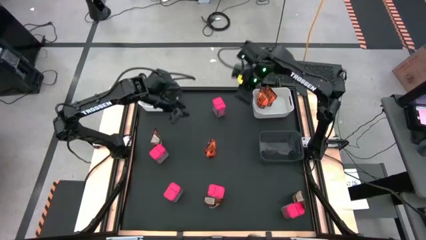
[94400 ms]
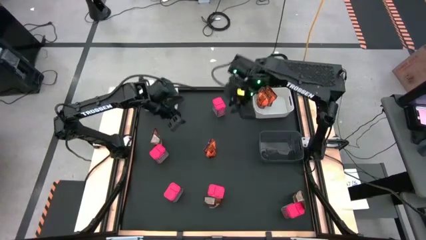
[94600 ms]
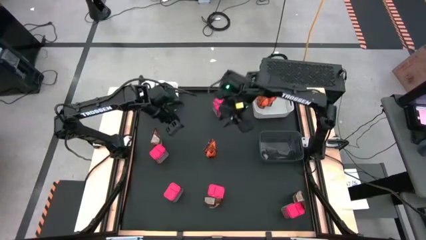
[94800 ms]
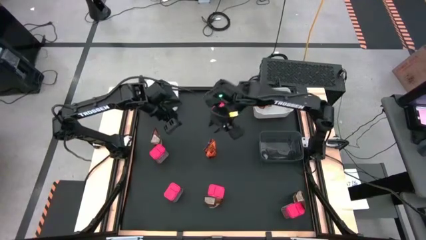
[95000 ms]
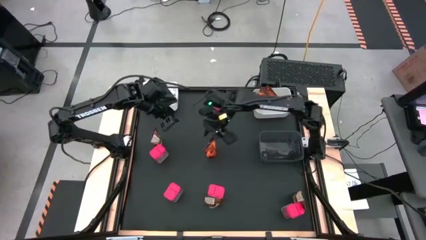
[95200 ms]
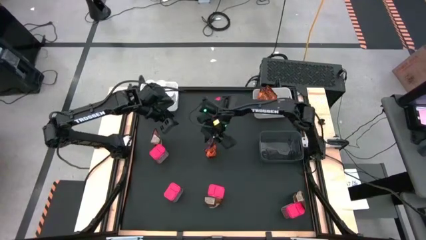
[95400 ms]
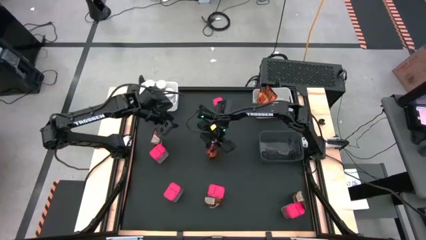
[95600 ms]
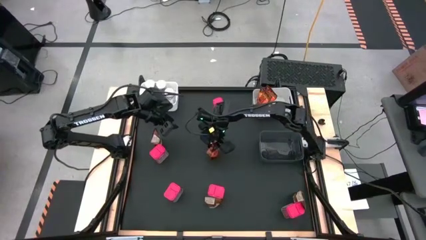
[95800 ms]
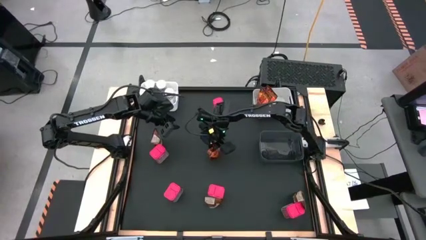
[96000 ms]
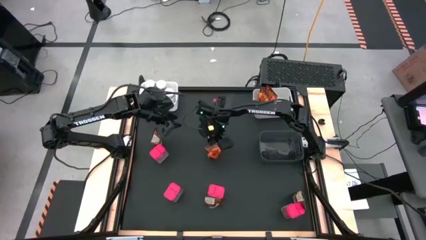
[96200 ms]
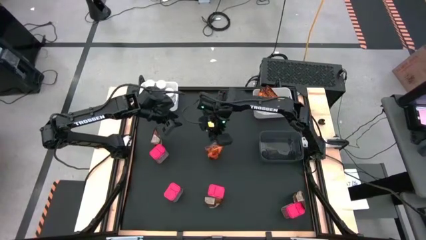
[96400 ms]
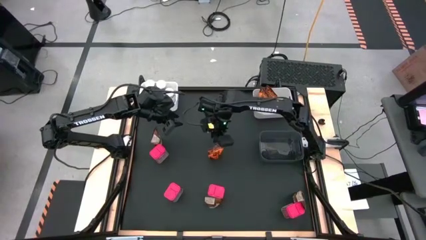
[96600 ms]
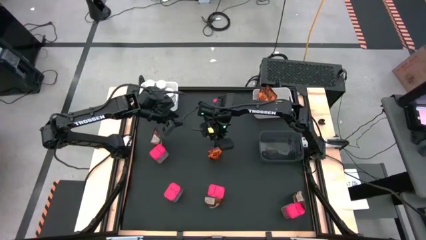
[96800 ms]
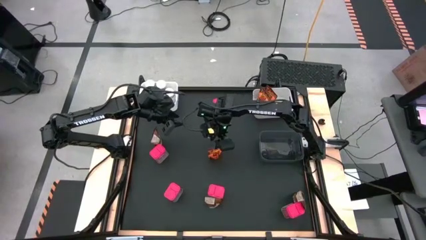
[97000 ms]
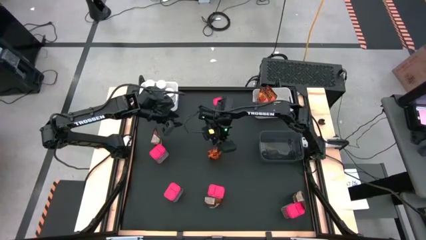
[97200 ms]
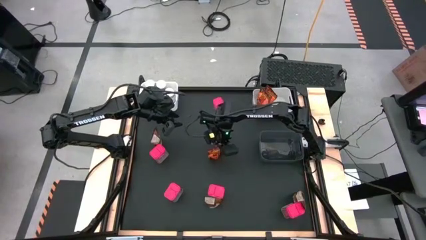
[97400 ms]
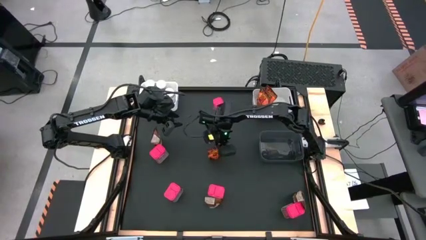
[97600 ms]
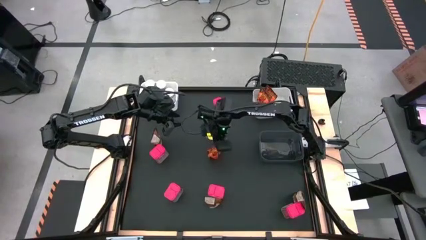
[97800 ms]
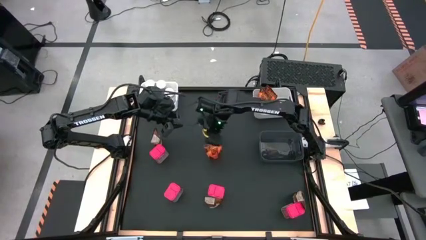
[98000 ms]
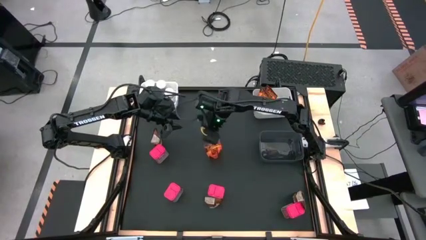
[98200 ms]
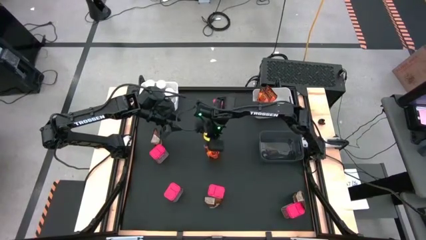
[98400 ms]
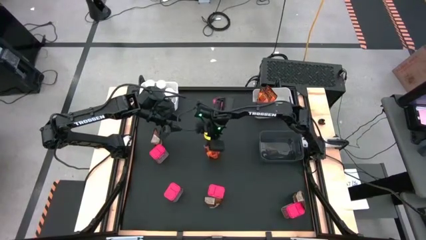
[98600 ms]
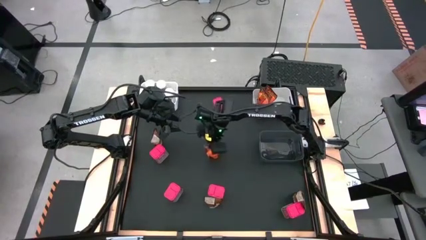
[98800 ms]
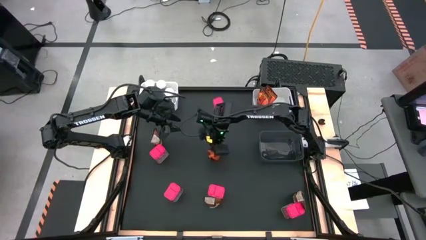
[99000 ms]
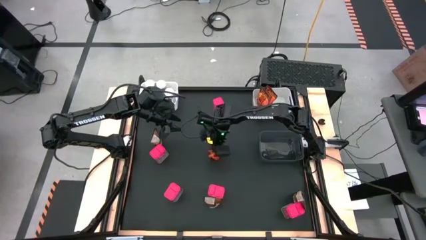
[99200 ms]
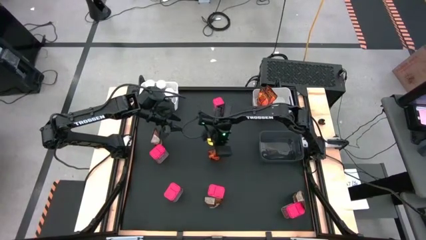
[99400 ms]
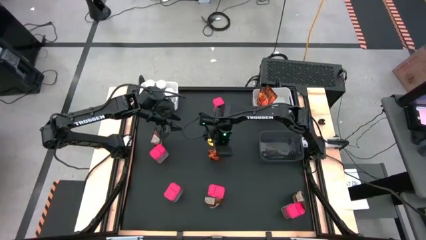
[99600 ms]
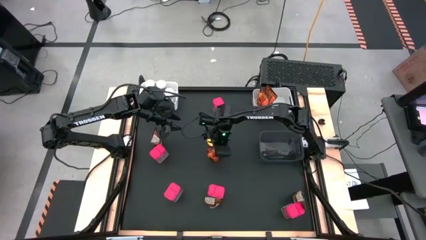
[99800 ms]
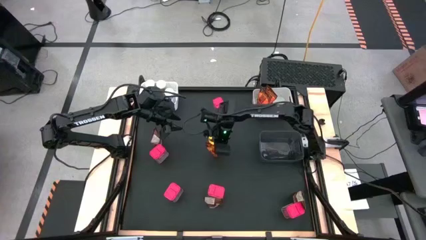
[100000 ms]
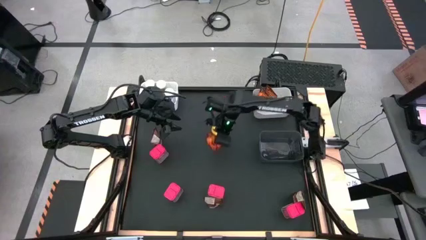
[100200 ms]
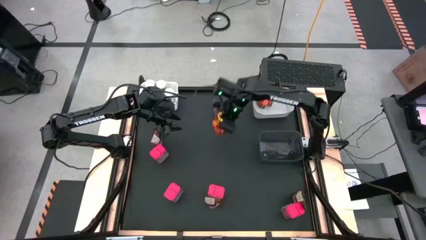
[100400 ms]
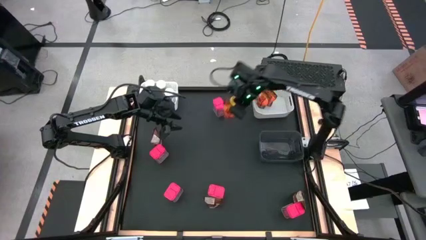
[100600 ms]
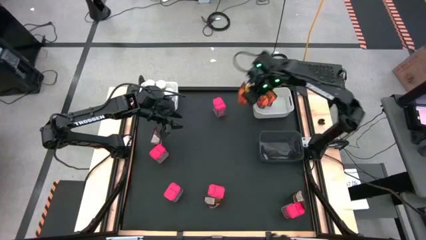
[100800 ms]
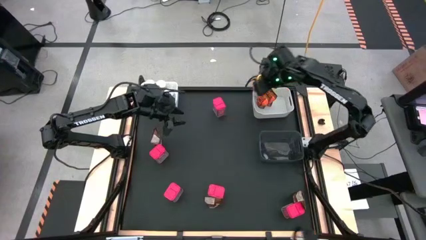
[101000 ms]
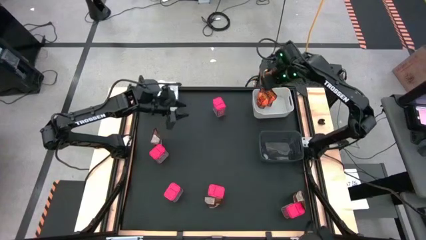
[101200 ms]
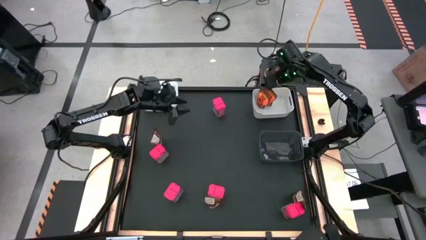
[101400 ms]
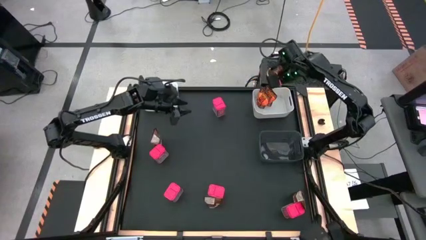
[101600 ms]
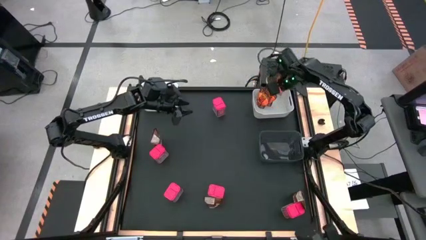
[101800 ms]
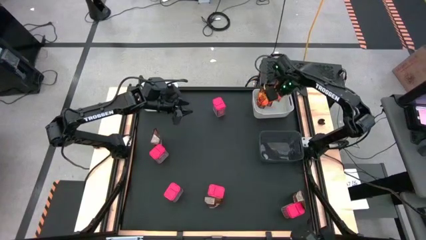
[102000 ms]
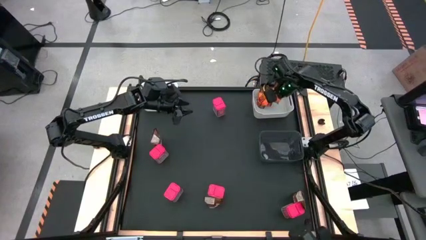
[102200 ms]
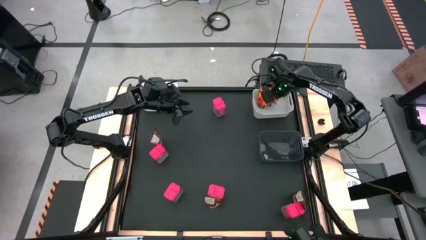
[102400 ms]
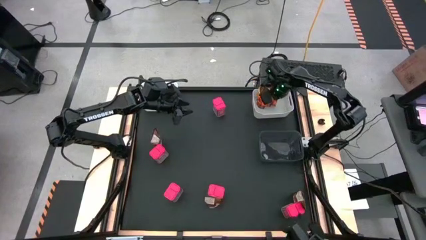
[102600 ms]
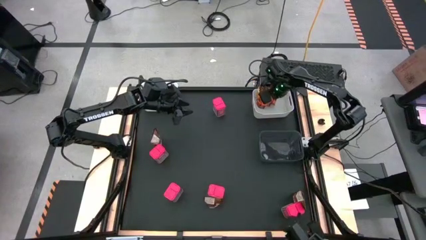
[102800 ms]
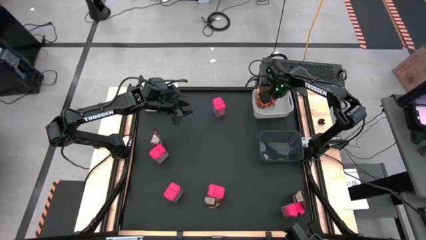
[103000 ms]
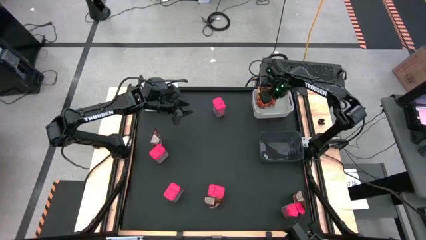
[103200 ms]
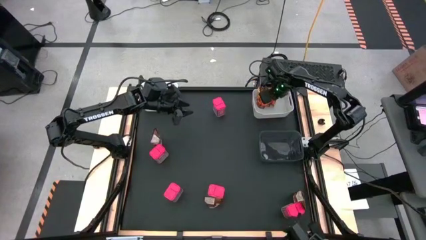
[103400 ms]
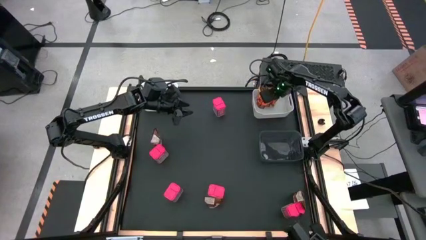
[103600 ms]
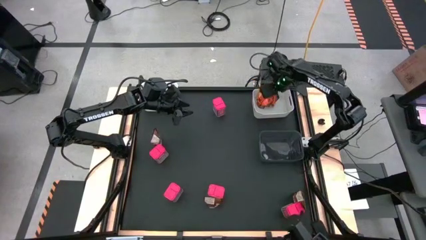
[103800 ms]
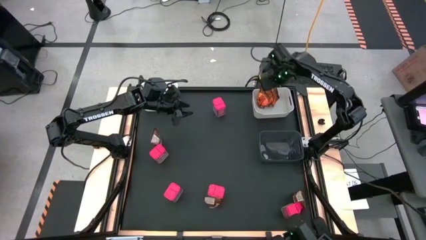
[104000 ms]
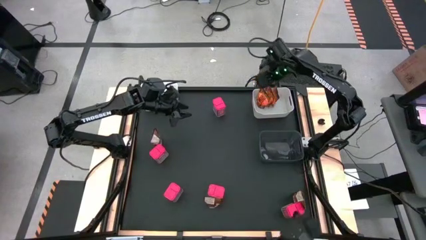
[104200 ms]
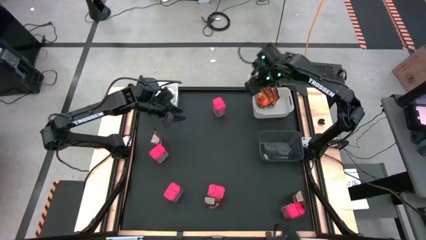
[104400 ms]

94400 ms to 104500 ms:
Task: Sort spices by type
Put the orange seasoning bag into the right white bin

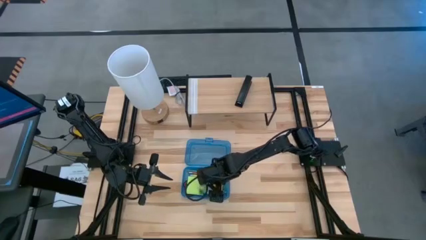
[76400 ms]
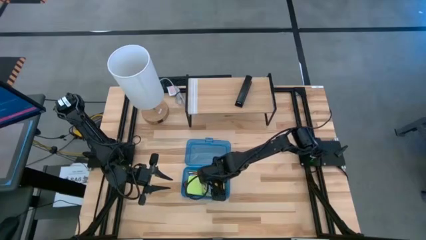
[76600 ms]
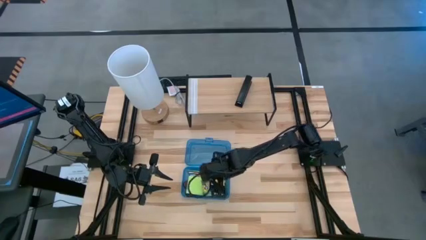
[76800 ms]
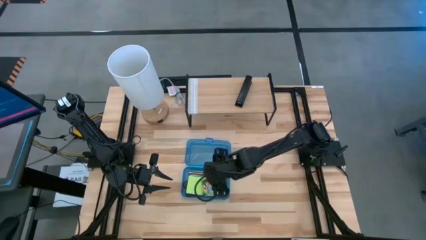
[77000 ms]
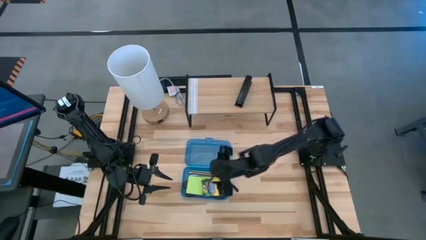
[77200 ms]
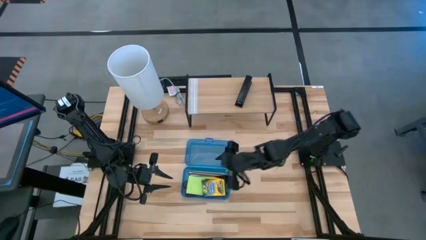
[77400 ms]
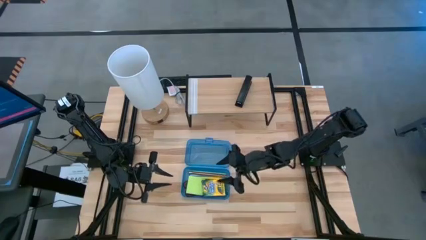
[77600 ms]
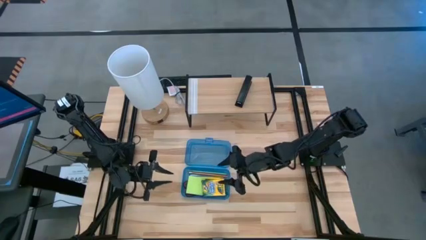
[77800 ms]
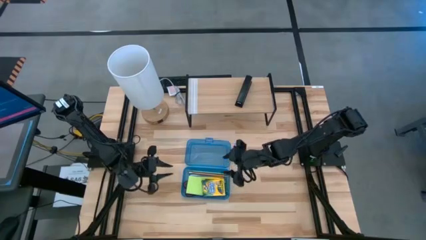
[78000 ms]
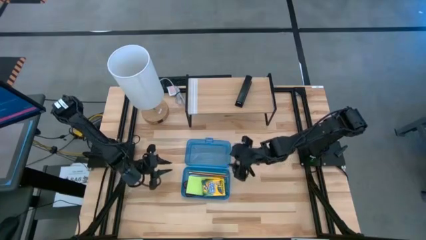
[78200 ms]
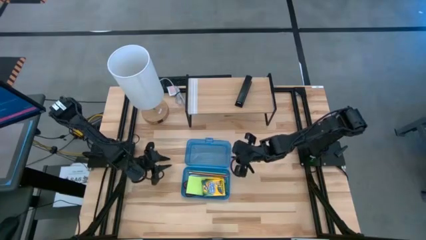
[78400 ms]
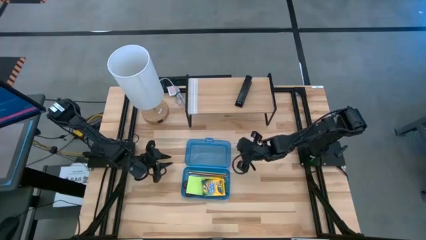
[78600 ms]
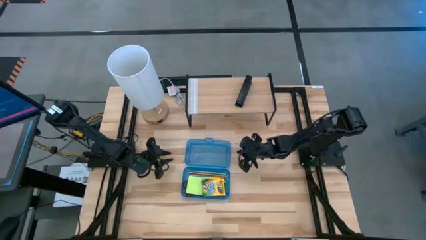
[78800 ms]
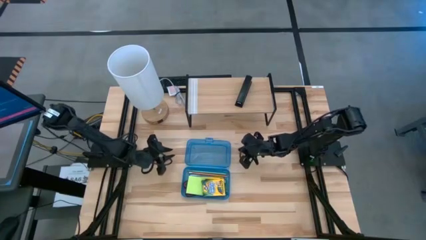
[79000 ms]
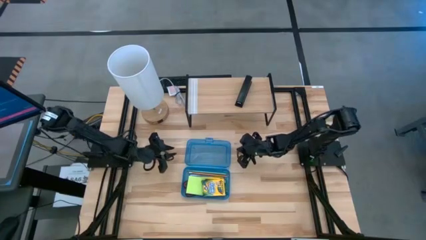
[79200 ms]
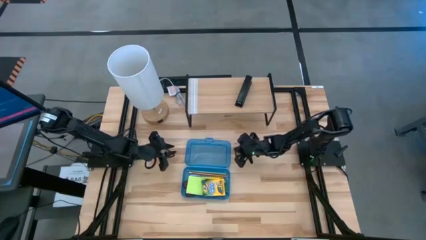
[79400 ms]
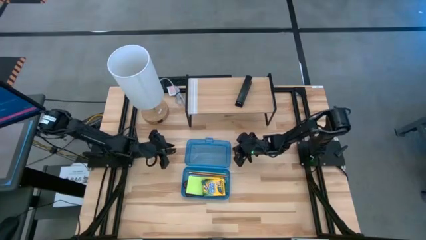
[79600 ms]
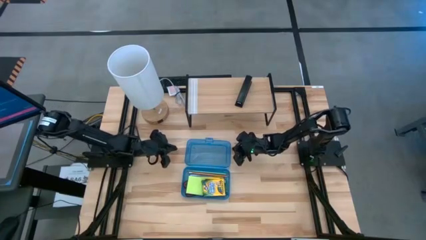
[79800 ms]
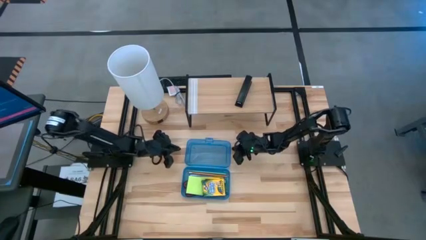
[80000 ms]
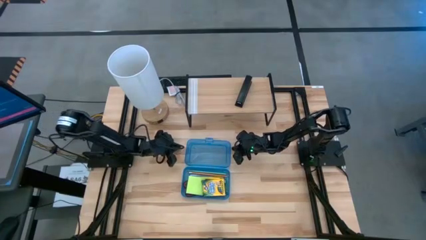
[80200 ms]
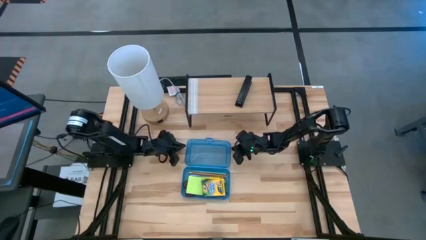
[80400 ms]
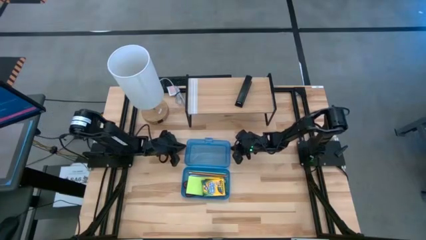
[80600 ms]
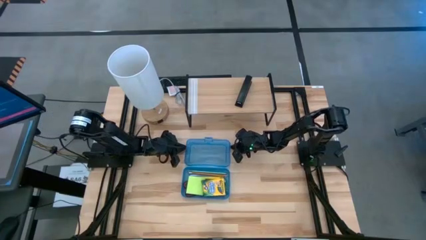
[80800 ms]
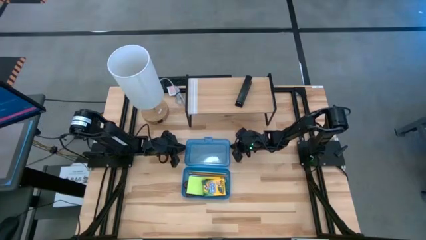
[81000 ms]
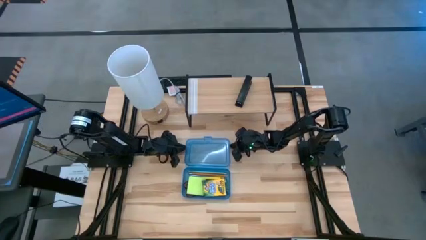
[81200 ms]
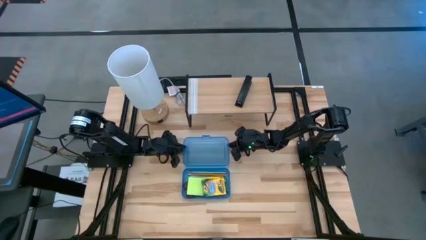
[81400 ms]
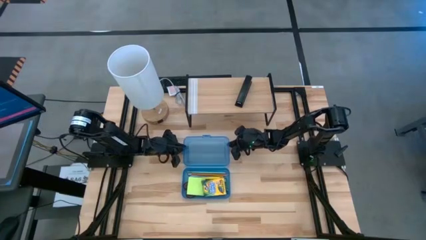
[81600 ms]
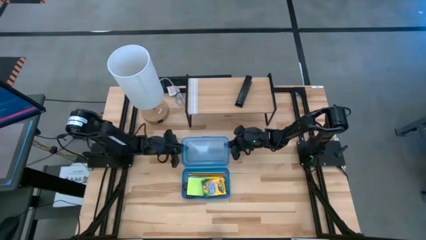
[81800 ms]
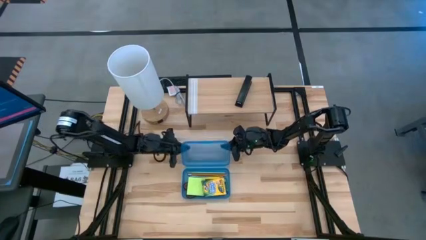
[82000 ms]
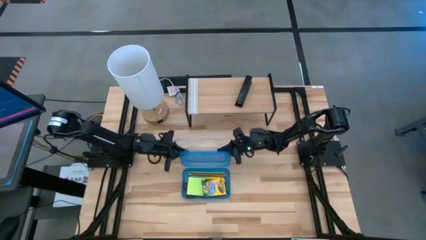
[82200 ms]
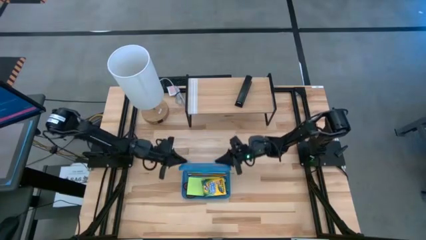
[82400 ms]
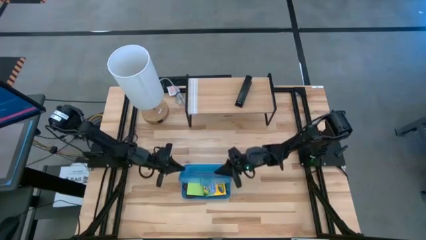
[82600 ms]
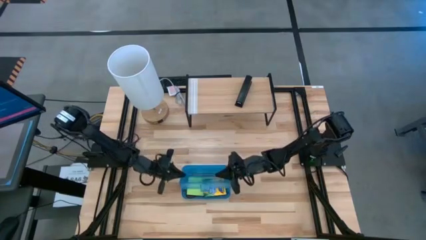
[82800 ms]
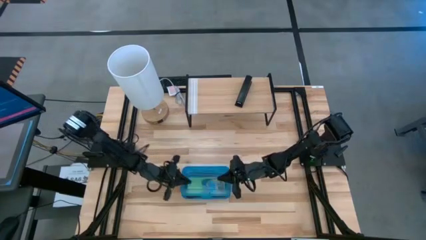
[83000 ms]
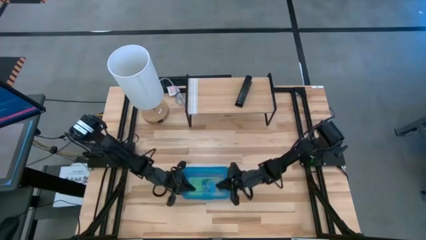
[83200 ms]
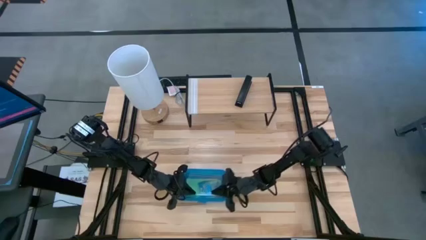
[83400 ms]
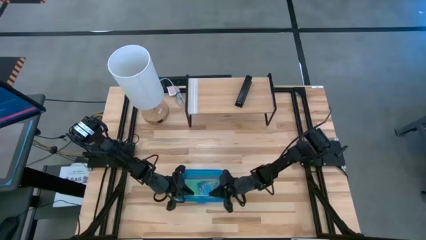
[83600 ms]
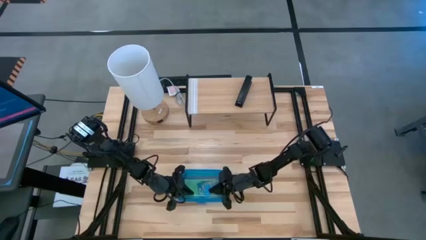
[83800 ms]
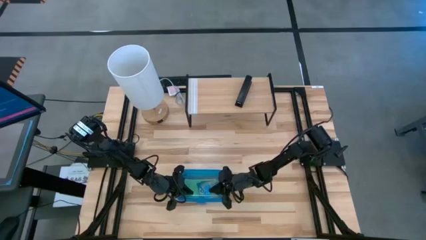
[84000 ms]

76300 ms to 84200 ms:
Task: Pack school essentials
Close the supply box
